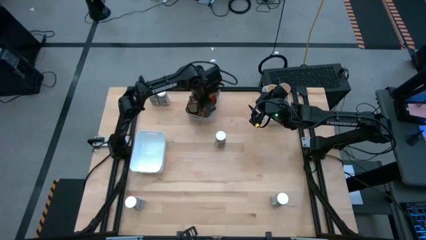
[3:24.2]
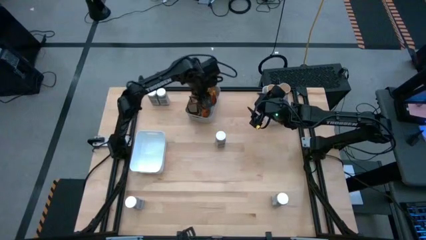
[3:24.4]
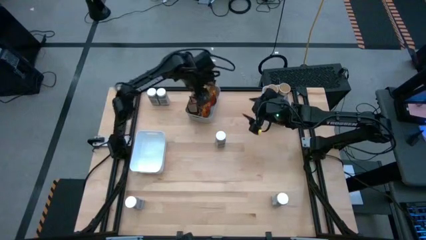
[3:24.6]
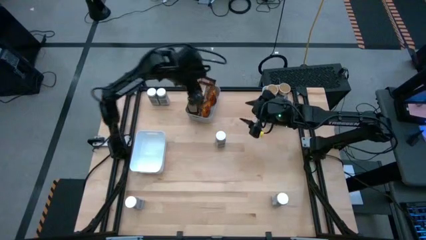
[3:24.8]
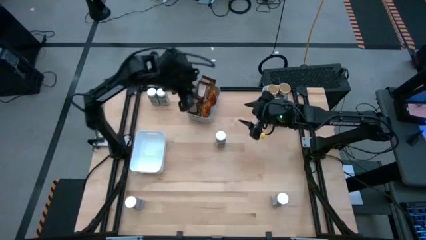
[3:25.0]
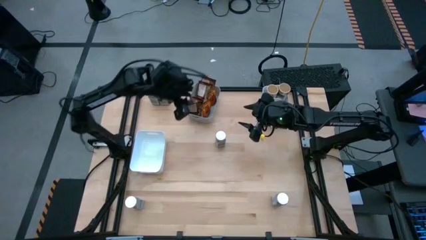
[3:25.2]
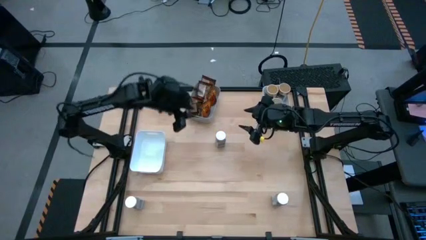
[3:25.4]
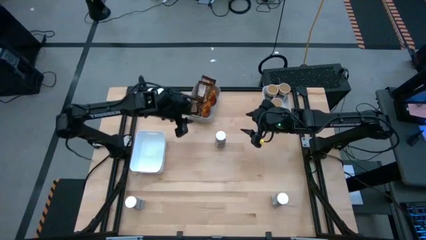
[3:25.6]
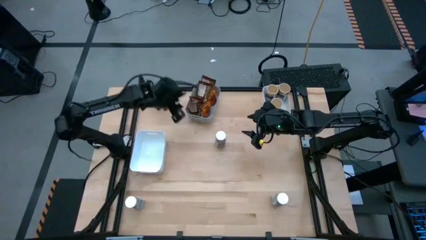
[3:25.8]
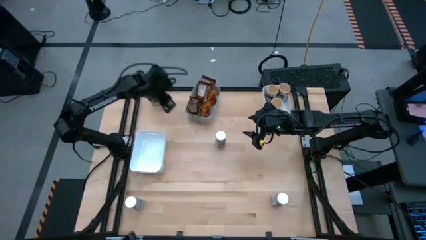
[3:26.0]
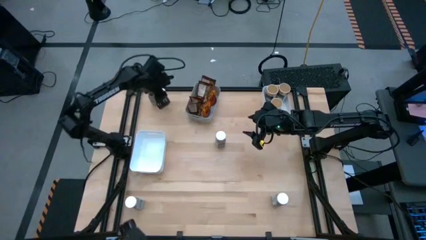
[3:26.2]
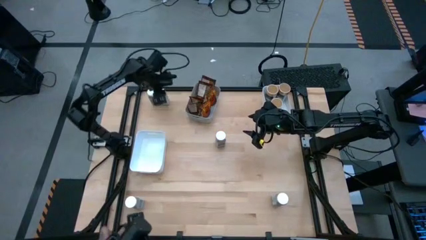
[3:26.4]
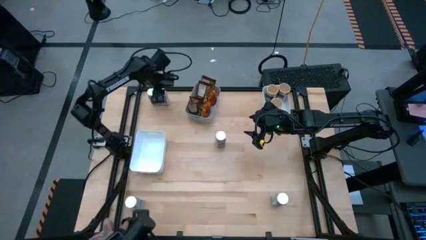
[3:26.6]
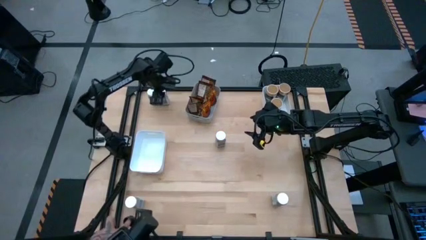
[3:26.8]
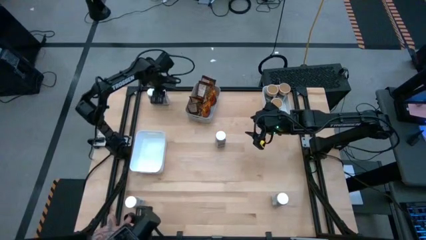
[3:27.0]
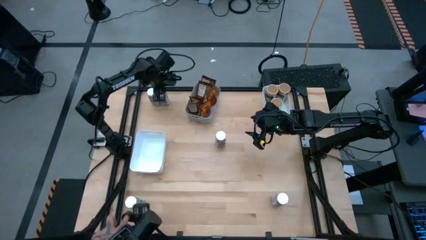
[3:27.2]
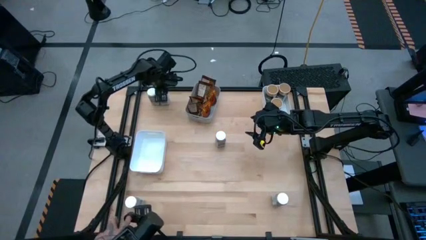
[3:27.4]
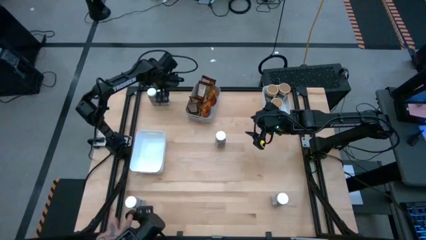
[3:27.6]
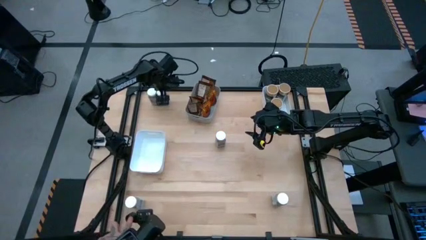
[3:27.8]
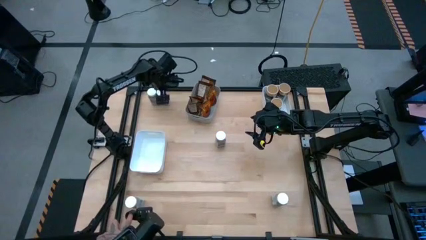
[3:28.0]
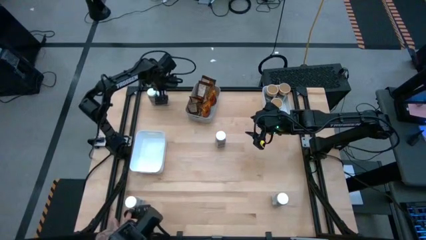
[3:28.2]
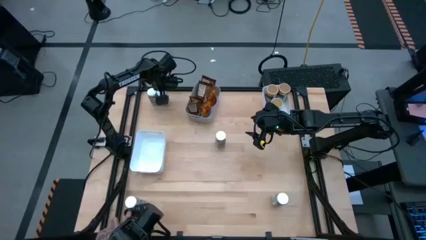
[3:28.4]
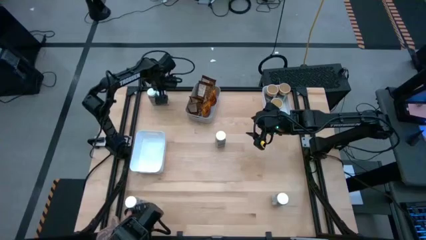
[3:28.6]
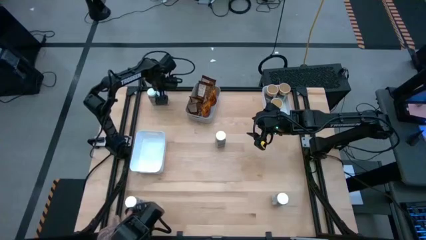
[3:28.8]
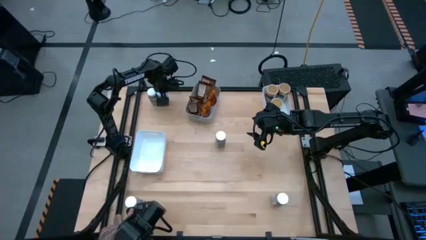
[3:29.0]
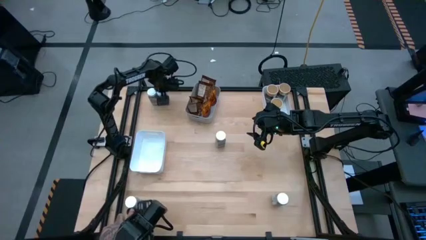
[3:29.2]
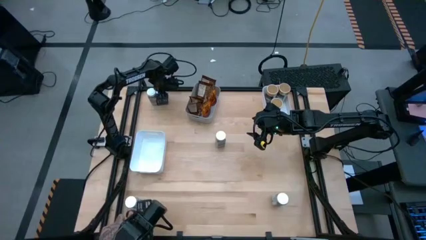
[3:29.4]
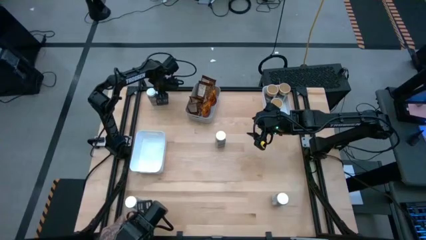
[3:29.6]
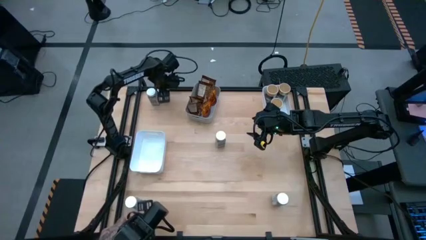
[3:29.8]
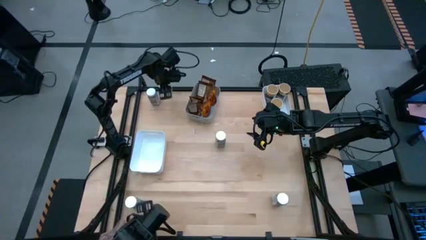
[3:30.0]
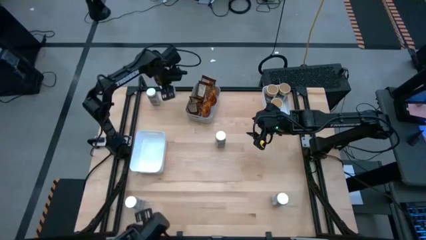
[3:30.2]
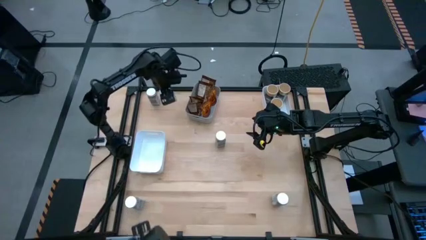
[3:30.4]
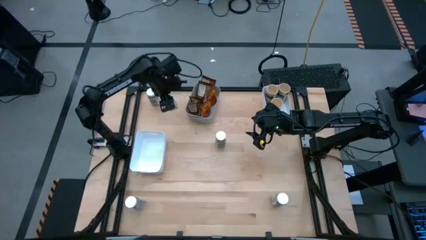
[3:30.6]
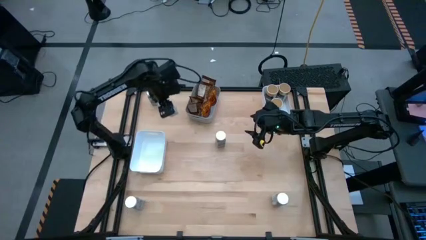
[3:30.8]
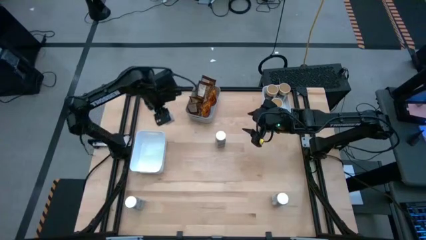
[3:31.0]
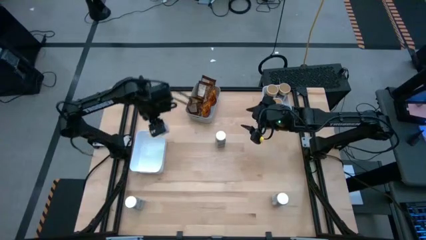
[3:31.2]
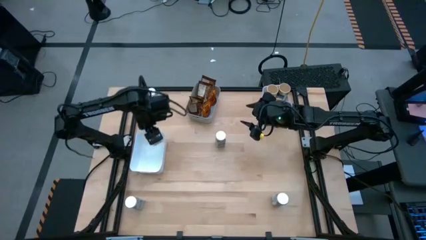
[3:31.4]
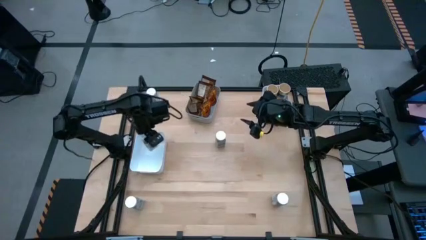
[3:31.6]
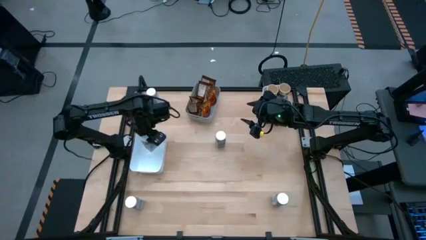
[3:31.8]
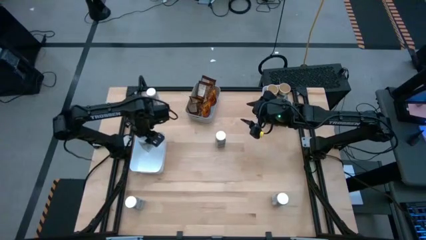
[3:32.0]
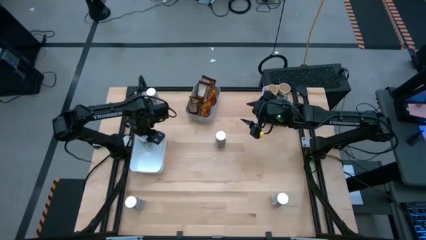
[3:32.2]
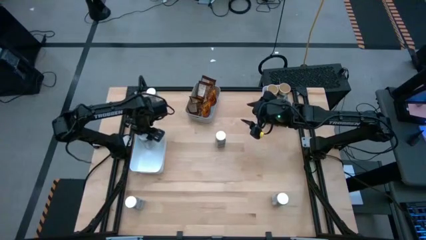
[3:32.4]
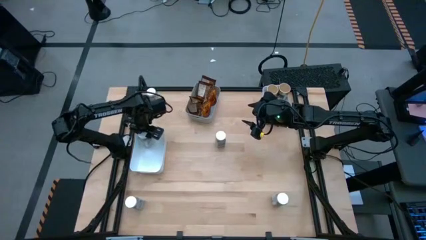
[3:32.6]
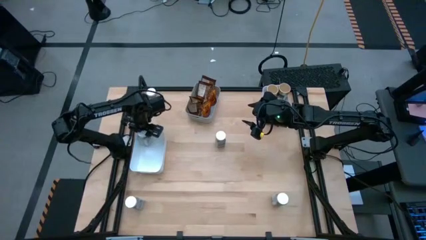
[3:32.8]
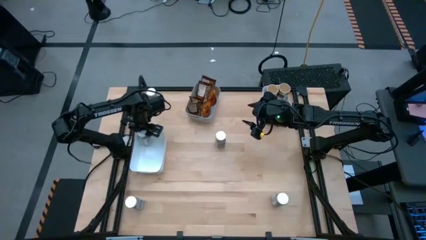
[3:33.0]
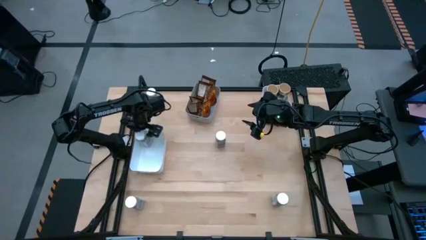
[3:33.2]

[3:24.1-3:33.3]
Task: Sort spices by type
Put the white spice bottle into the bottom white bin

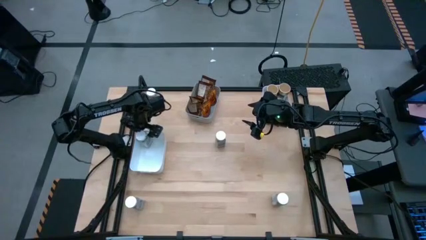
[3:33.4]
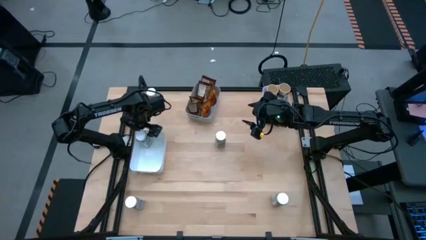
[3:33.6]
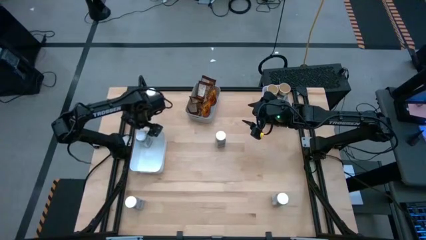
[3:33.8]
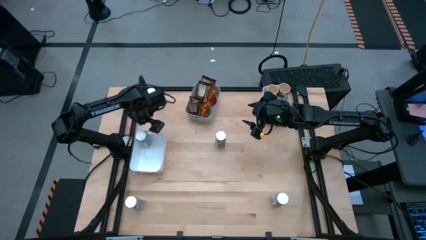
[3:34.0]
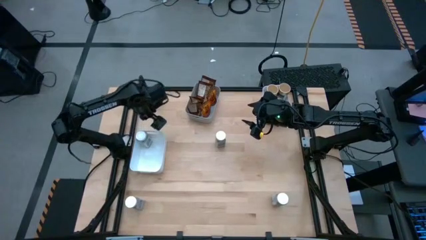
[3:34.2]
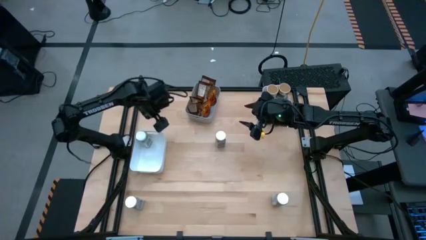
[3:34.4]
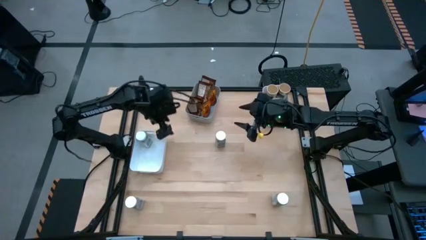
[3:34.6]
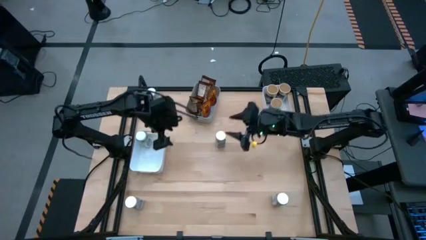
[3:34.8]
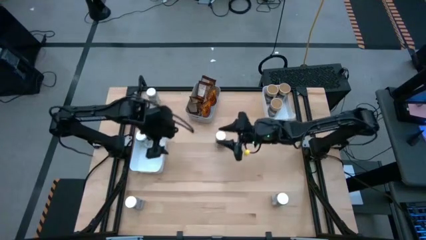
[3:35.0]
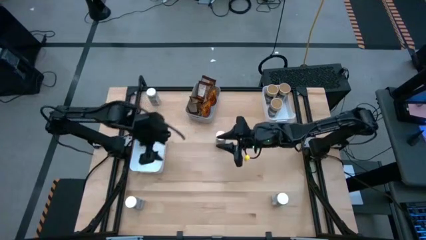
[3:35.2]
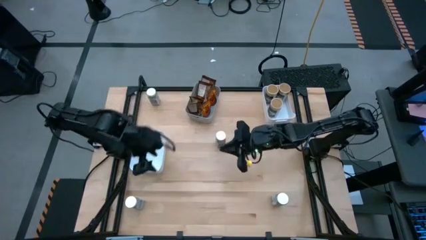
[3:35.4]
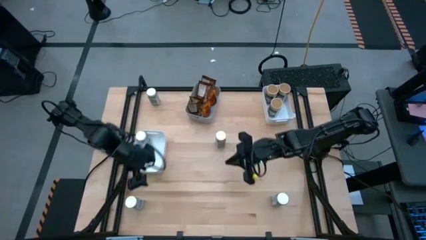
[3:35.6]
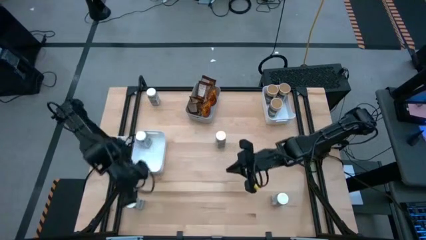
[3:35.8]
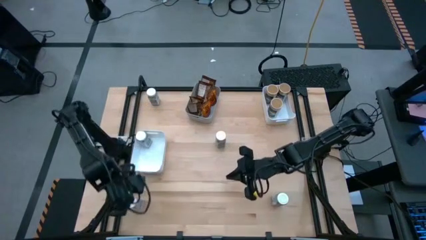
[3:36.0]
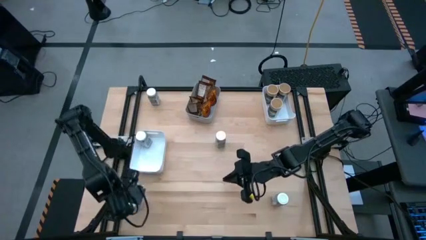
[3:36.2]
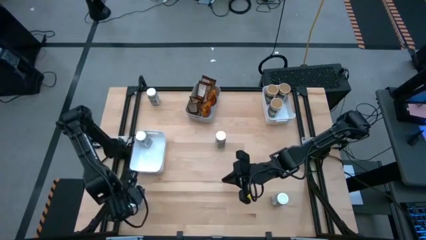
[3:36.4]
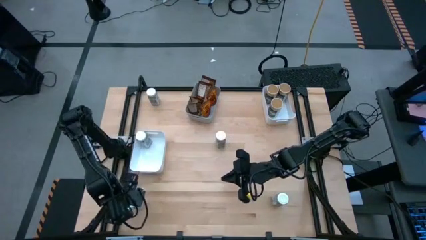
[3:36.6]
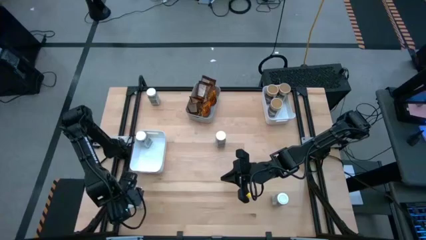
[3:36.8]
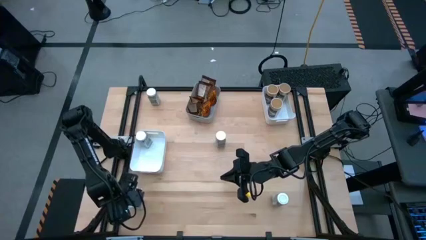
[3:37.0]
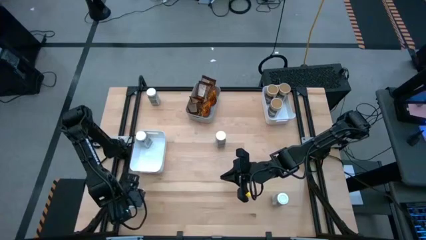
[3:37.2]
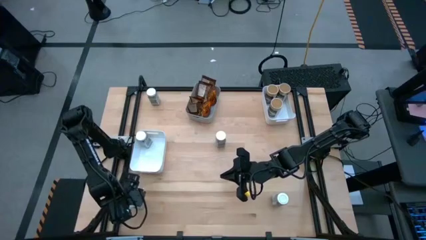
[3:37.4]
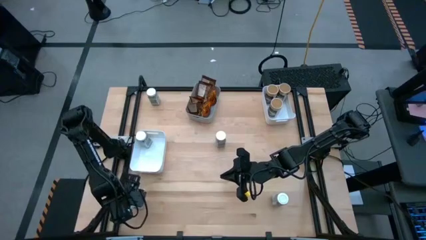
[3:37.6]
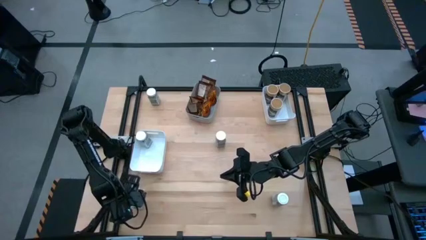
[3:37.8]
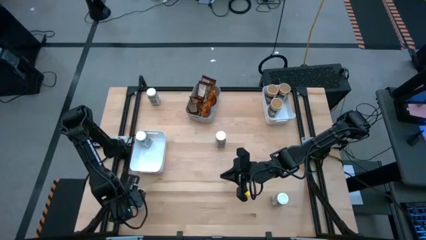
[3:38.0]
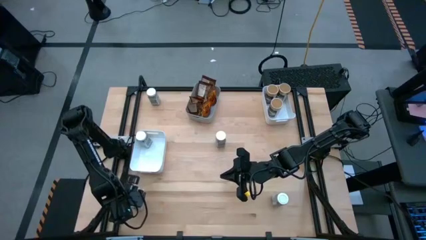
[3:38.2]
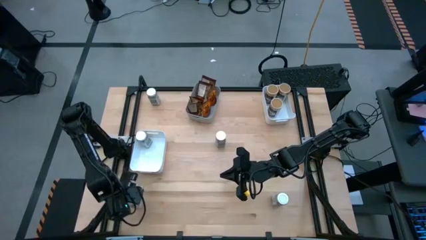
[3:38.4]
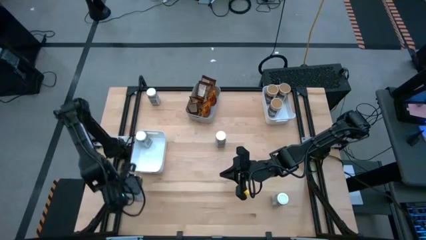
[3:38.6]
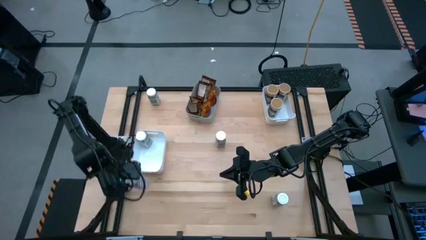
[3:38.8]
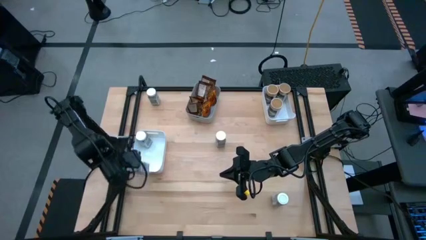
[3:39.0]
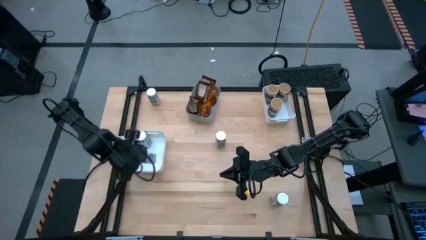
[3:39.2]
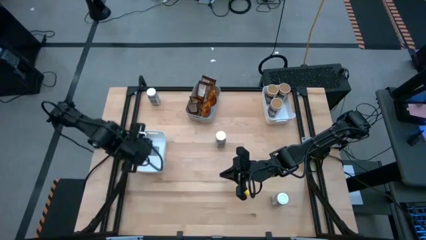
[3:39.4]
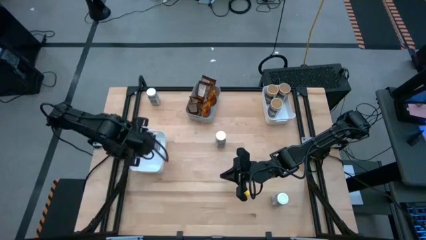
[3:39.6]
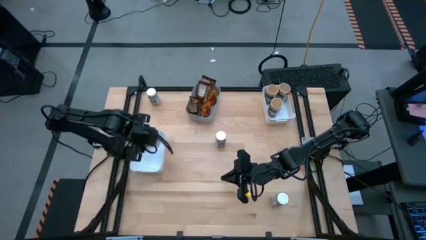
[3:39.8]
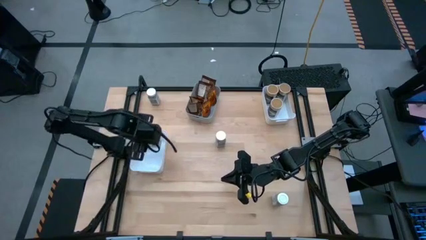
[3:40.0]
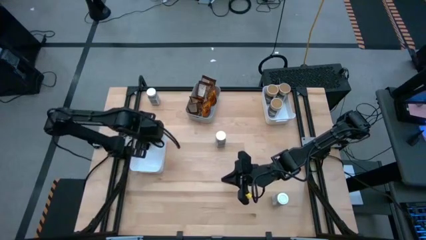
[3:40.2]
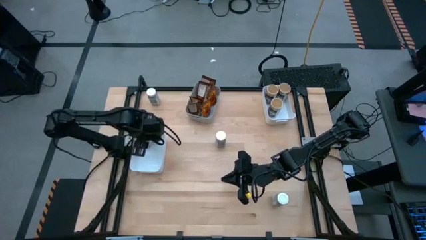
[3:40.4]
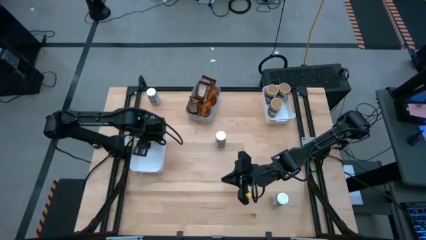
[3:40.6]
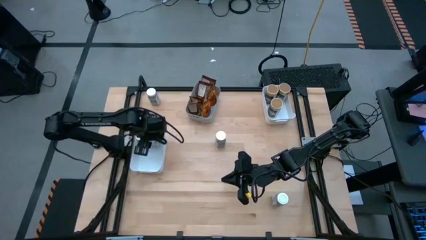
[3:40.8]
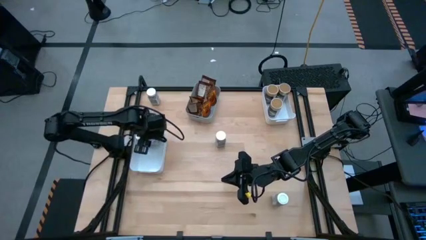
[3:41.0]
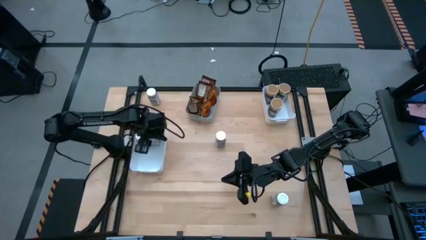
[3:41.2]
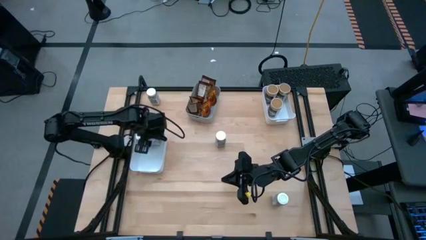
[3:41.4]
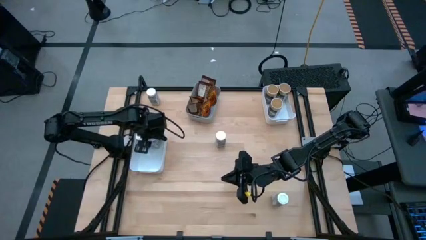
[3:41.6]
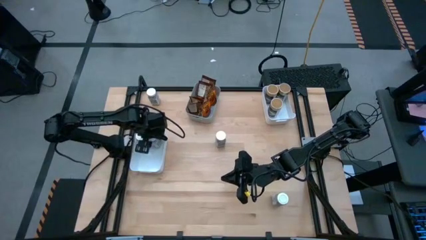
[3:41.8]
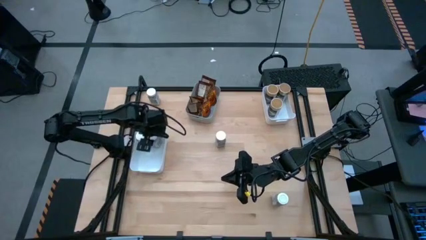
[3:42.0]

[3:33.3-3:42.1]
Put the white spice bottle into the bottom white bin
